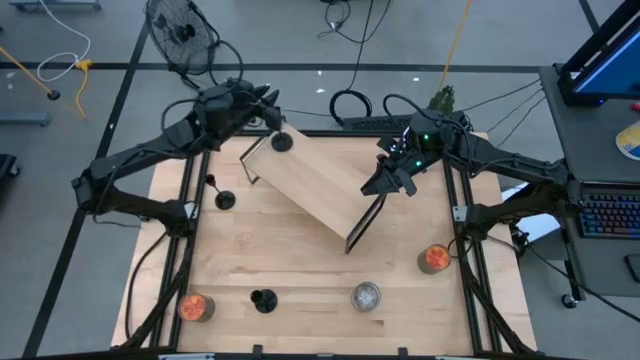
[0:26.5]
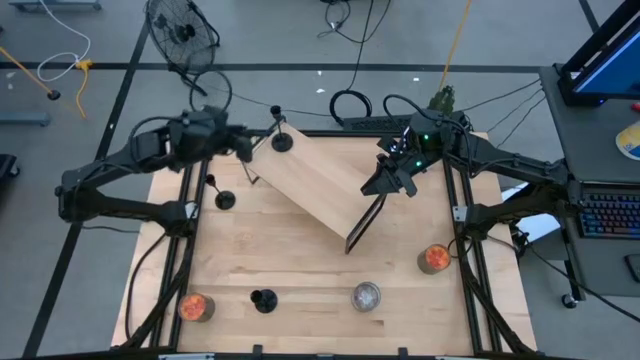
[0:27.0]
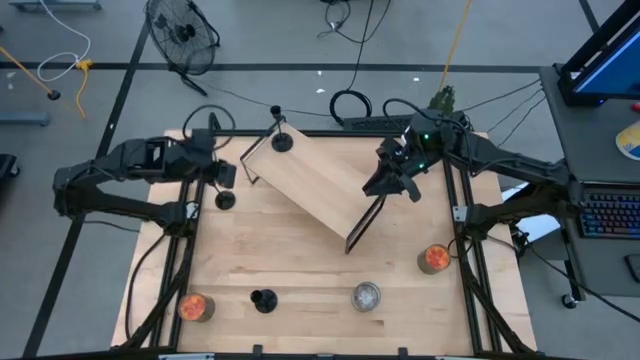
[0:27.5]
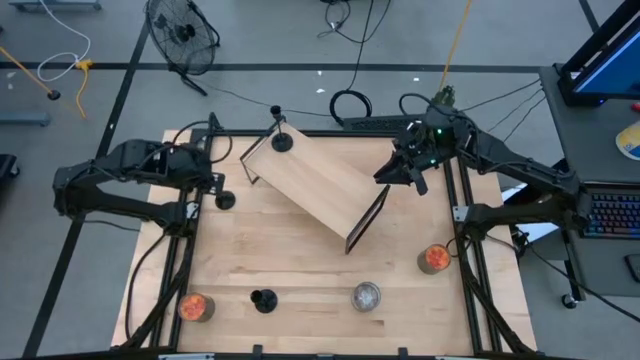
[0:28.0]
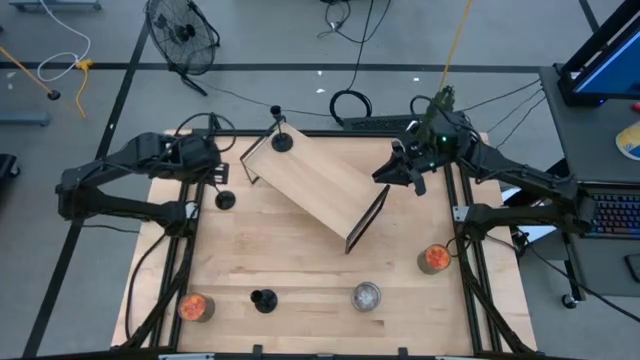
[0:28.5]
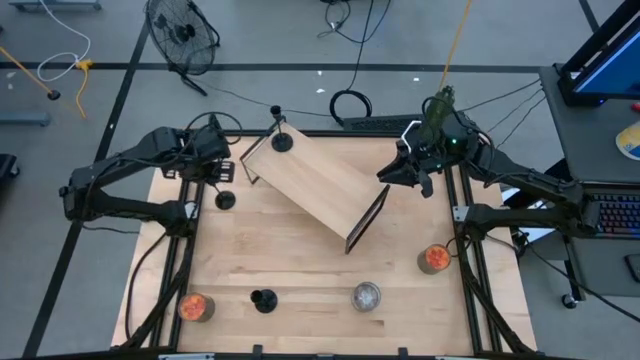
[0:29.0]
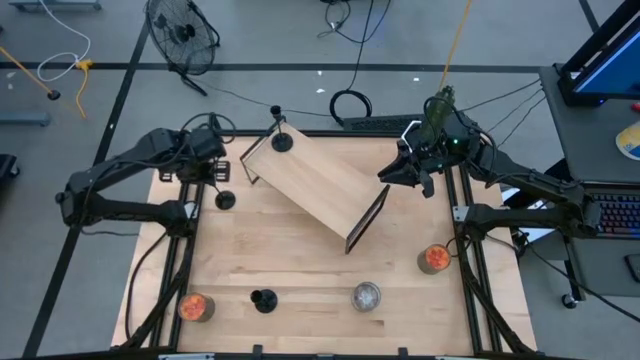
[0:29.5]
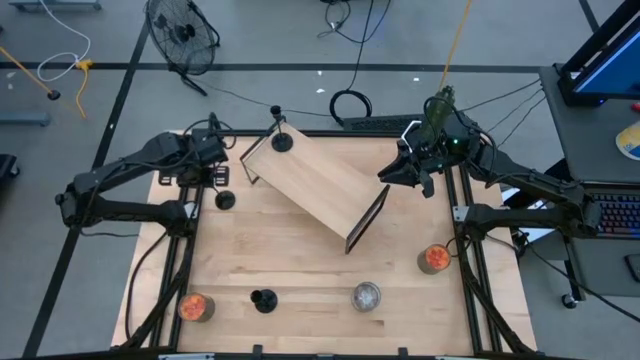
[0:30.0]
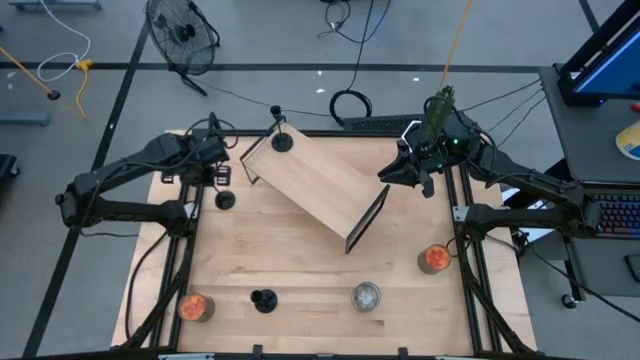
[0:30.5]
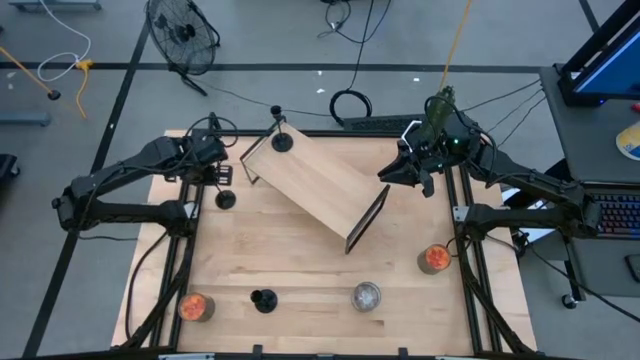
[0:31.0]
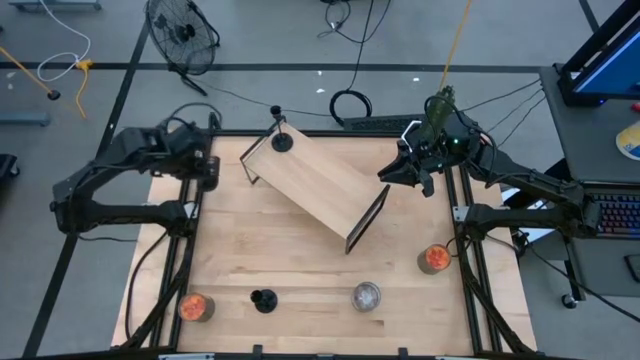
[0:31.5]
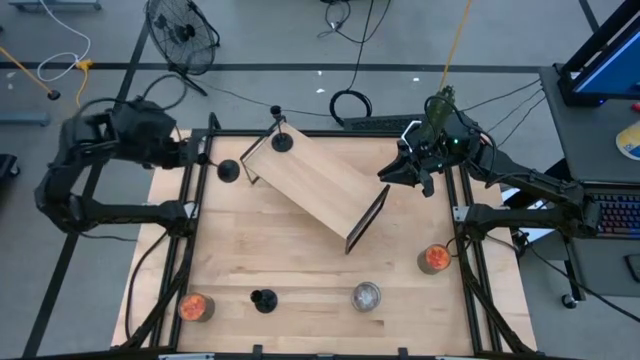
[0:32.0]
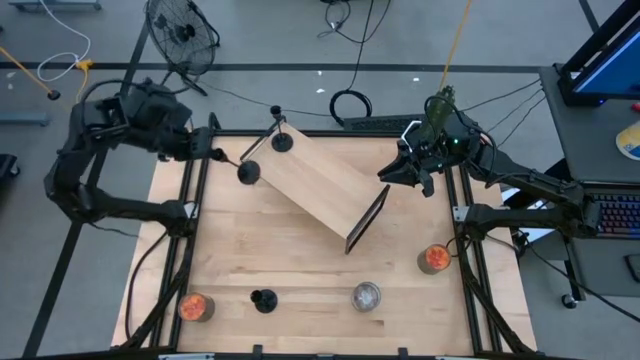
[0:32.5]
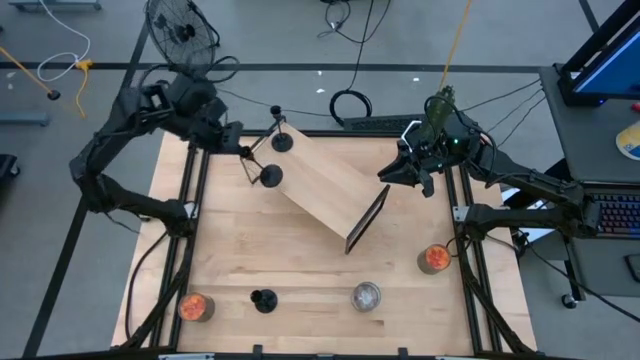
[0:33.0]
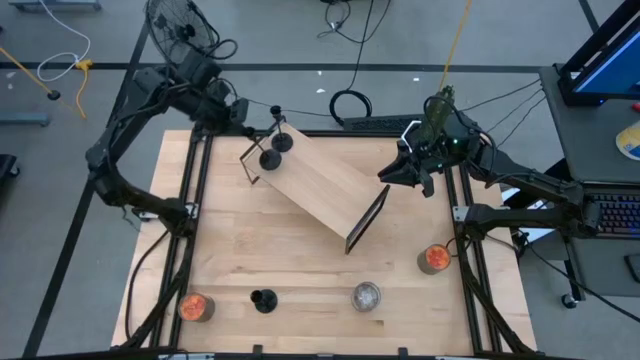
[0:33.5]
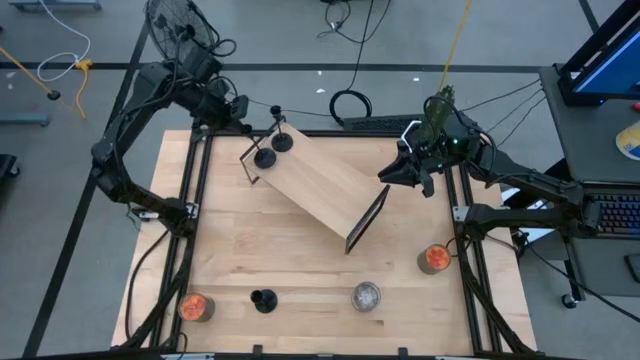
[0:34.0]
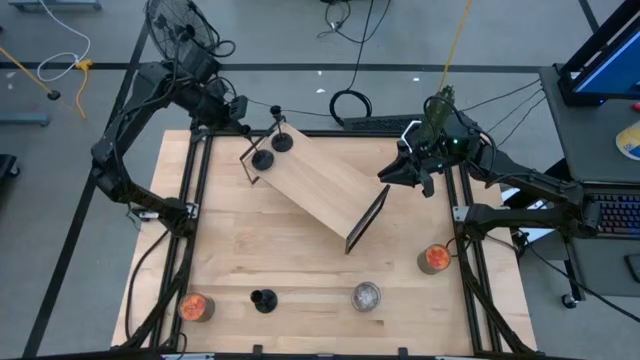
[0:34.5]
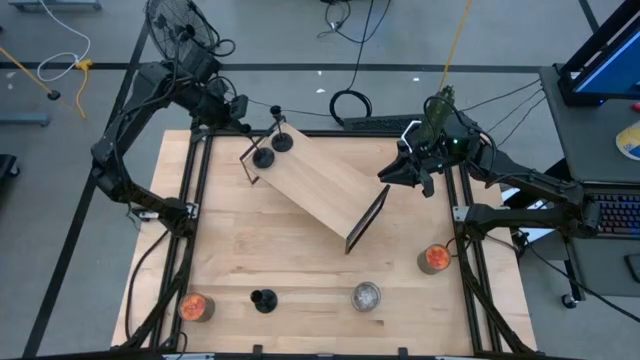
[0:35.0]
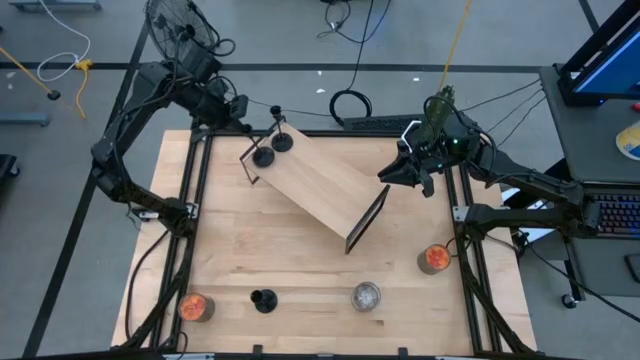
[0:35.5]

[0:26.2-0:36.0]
Task: Pick & Place candle stick holders
Put the top black candle holder on the shelf

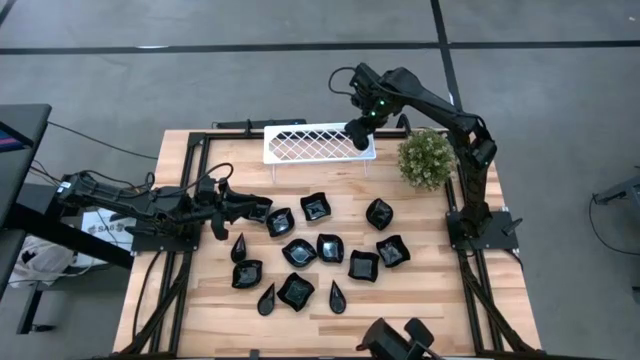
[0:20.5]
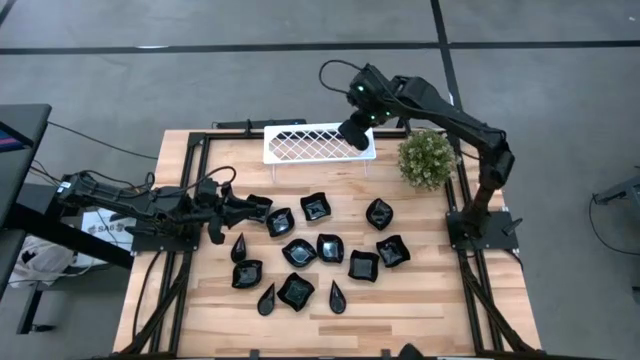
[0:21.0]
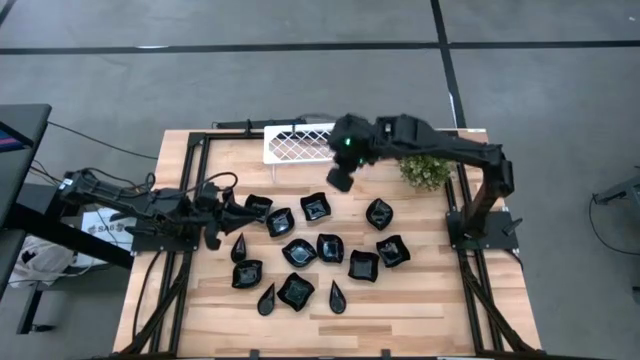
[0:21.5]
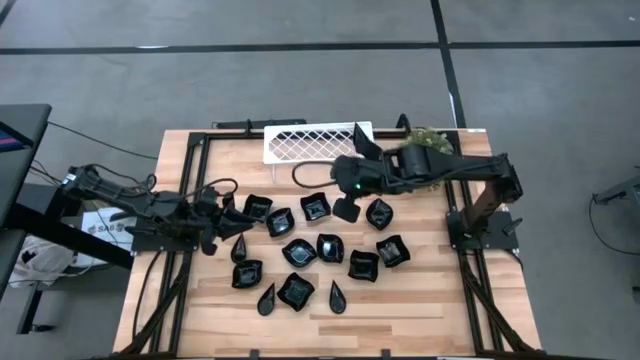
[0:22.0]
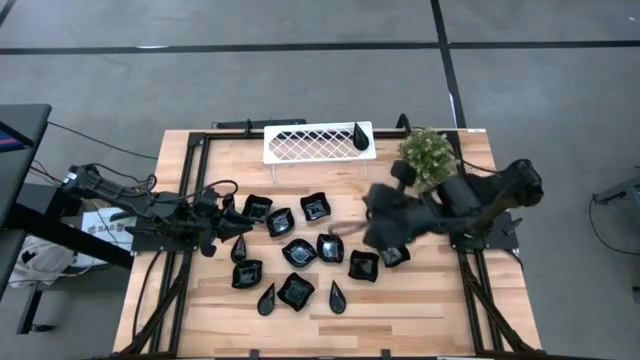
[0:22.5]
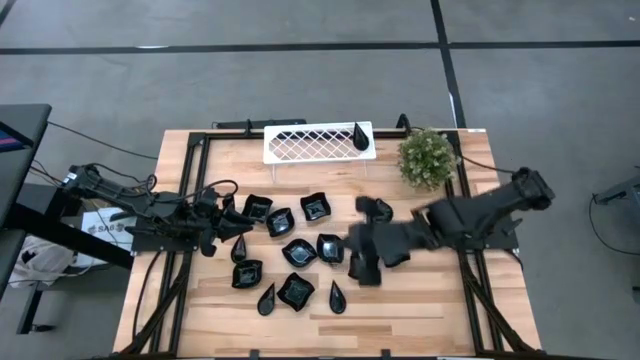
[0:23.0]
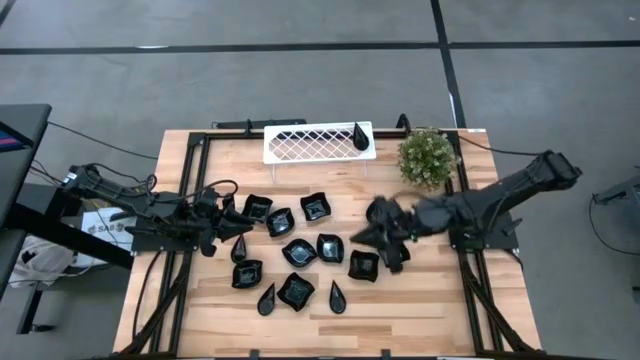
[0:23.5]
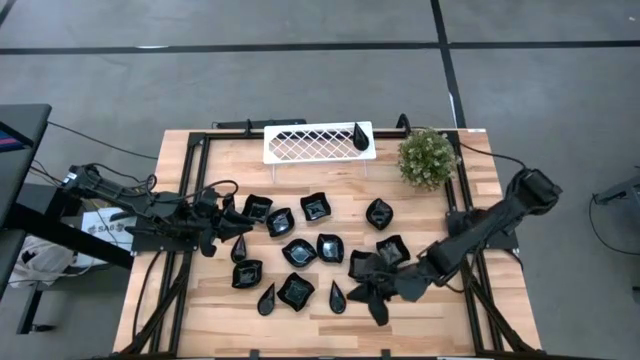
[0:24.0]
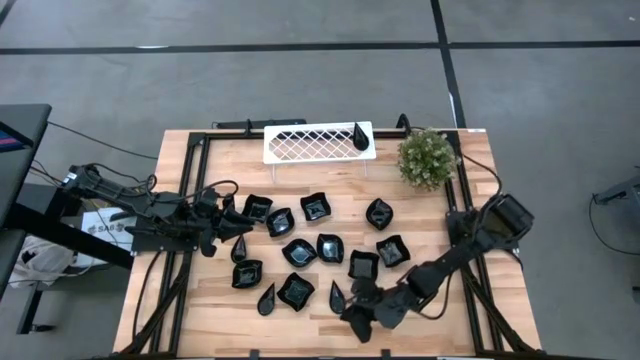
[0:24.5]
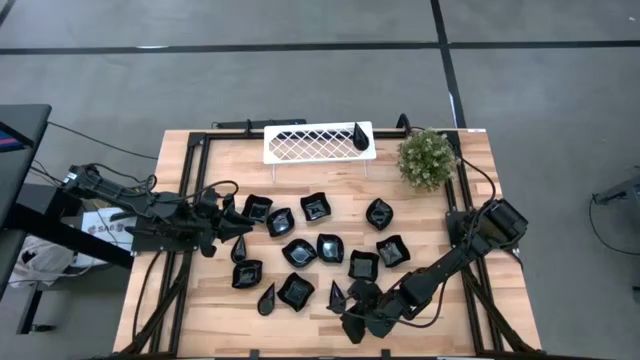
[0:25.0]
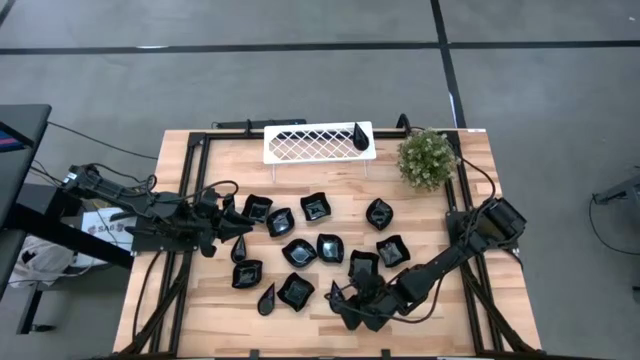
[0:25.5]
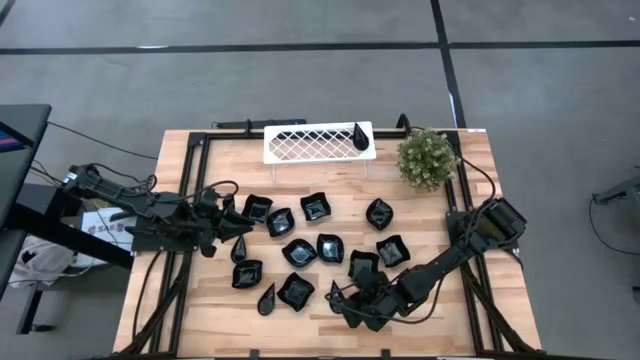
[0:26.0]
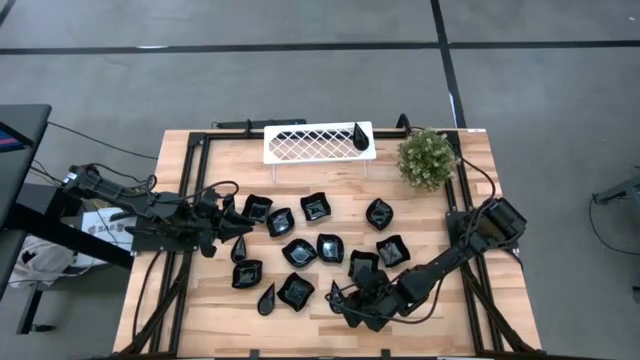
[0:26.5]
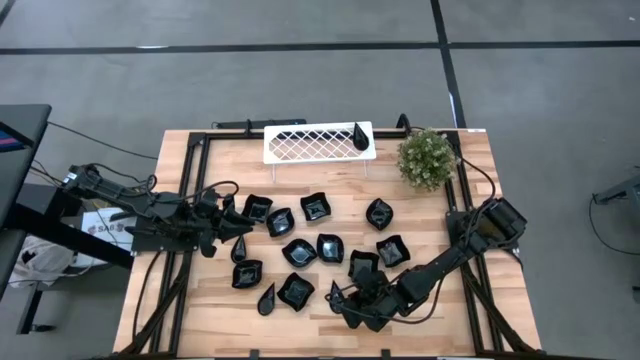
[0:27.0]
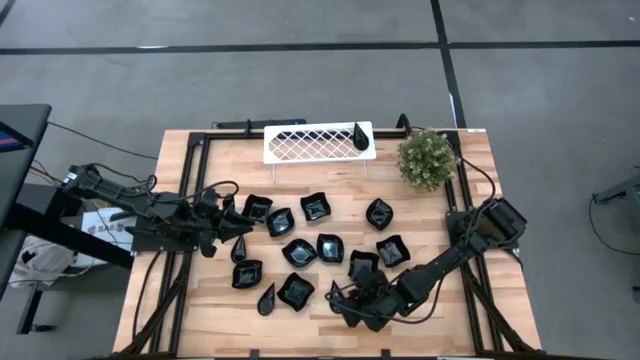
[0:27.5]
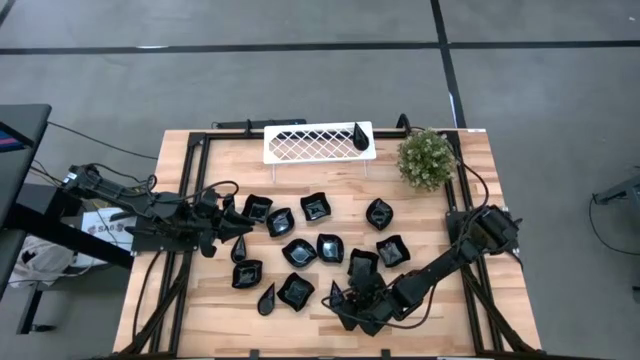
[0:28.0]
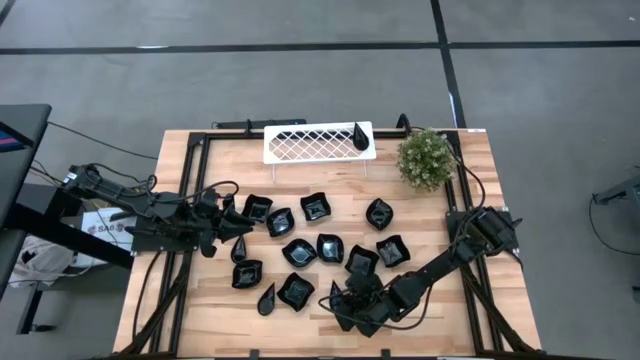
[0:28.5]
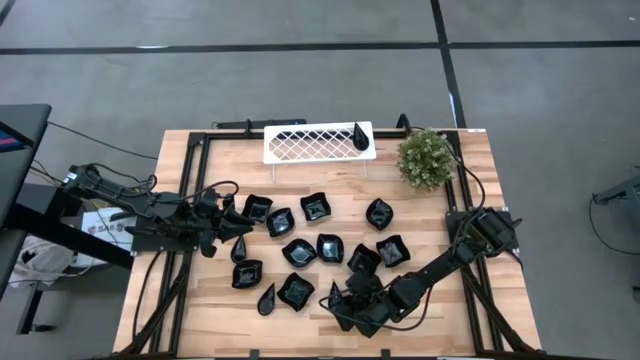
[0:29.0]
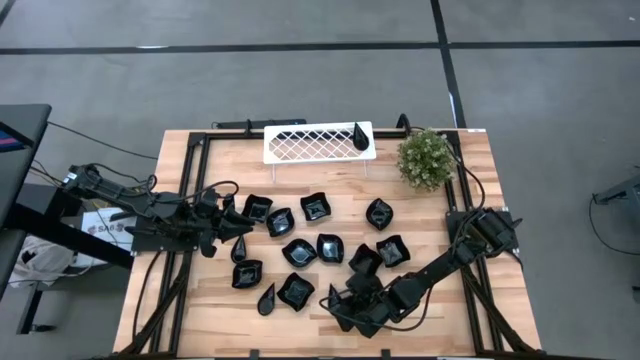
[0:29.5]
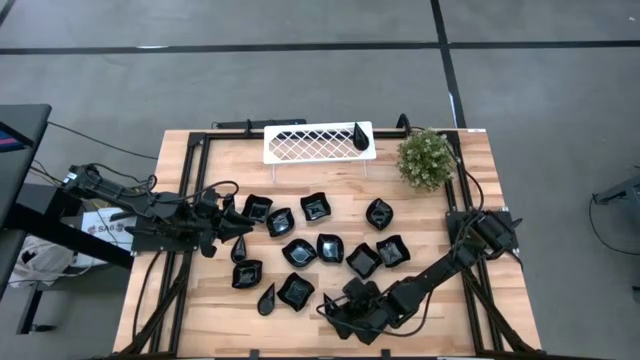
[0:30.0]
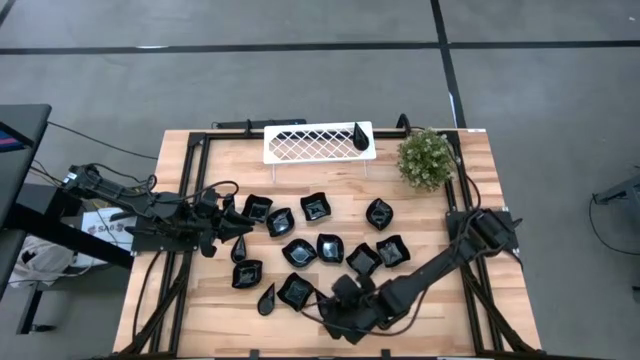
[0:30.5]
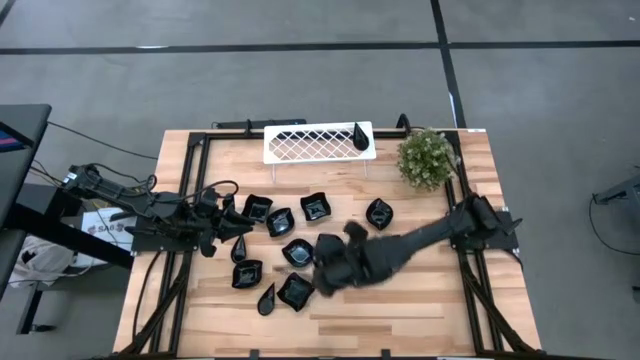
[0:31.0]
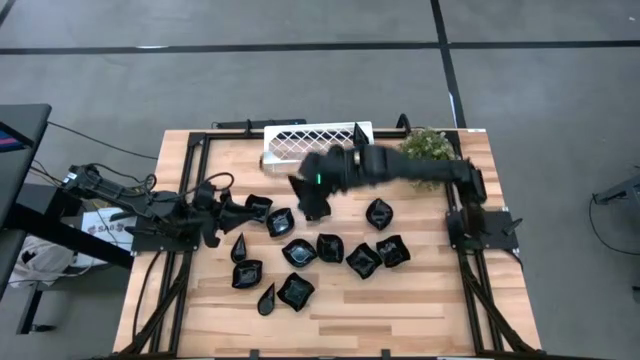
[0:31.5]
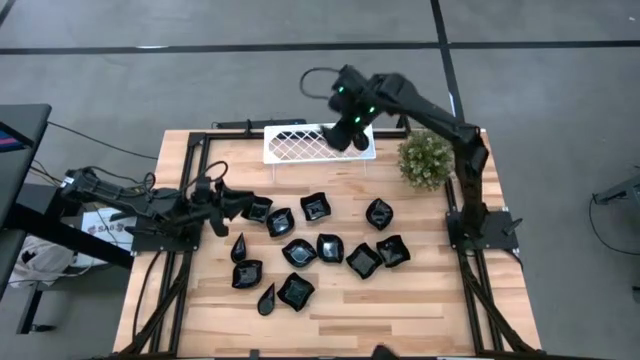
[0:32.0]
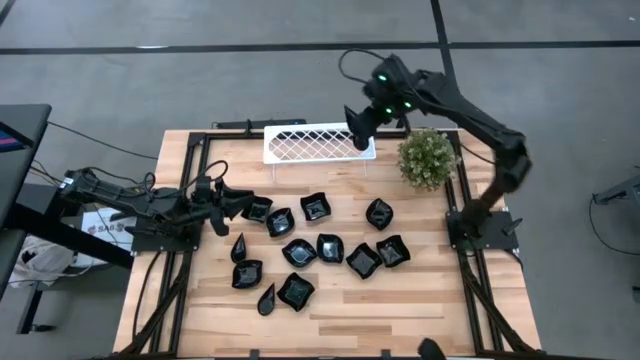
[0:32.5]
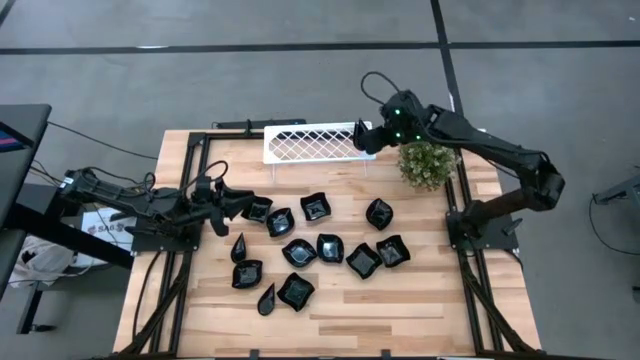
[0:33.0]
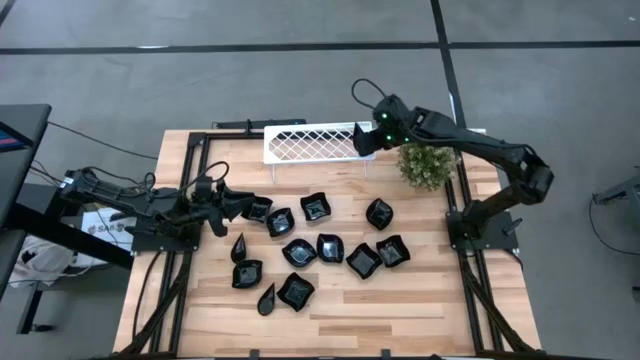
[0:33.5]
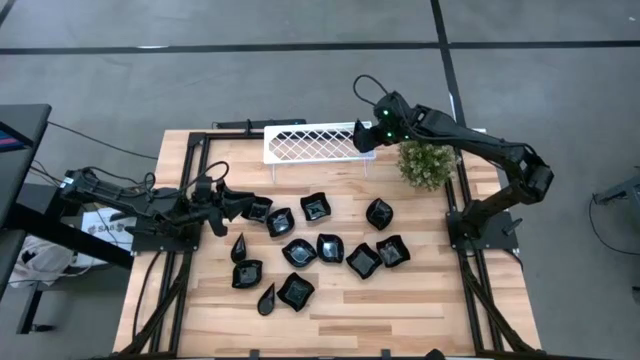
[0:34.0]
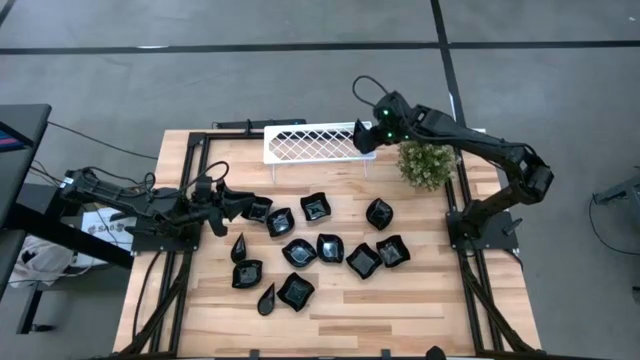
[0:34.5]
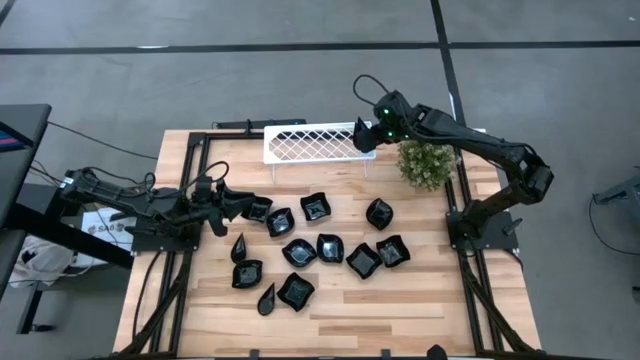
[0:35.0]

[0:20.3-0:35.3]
Task: Pick & Place Mini shaped plates
Stack the black drop shaped plate on top of the black drop shaped plate on the shelf
